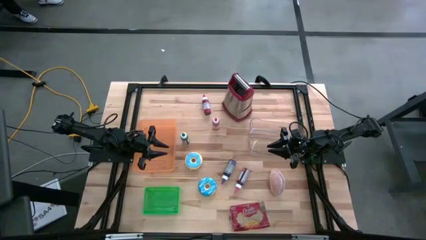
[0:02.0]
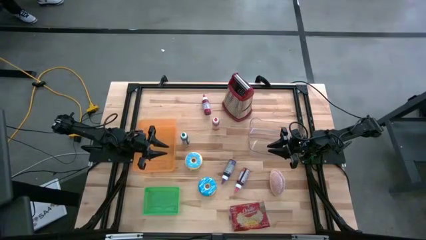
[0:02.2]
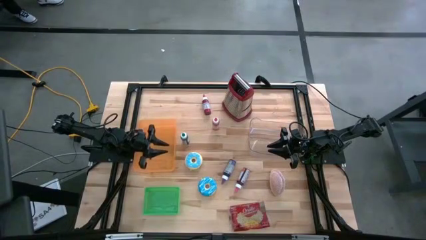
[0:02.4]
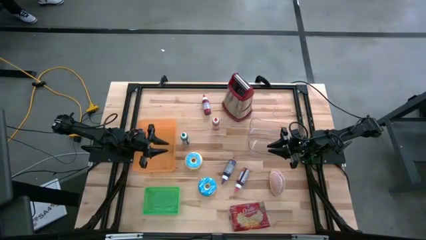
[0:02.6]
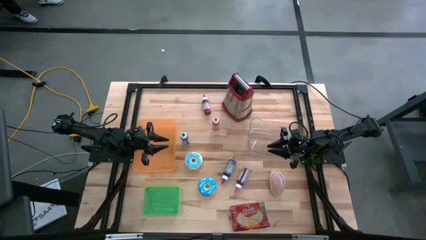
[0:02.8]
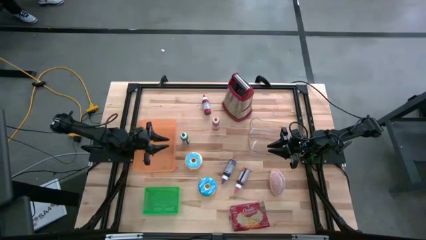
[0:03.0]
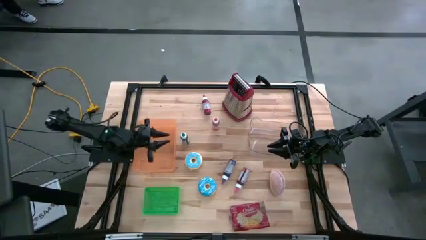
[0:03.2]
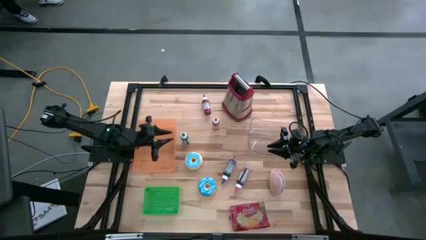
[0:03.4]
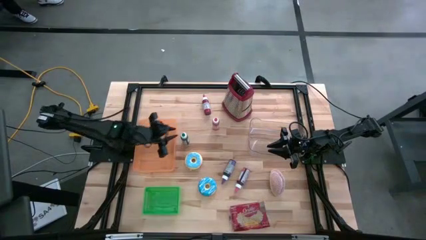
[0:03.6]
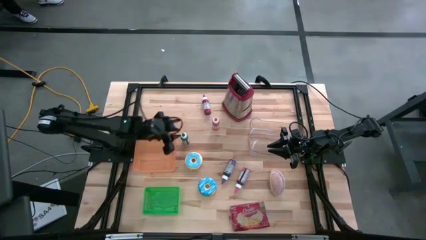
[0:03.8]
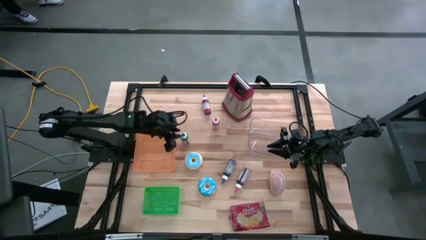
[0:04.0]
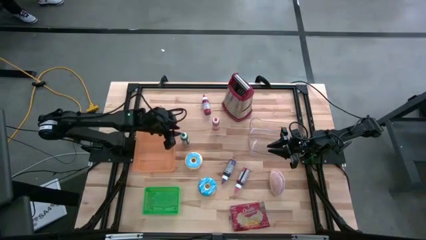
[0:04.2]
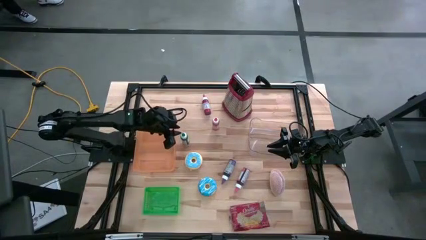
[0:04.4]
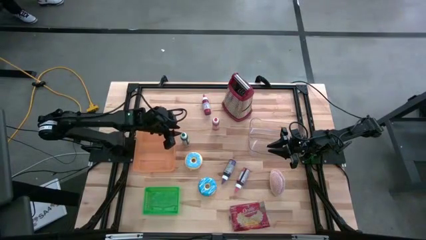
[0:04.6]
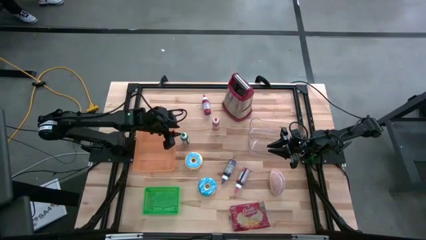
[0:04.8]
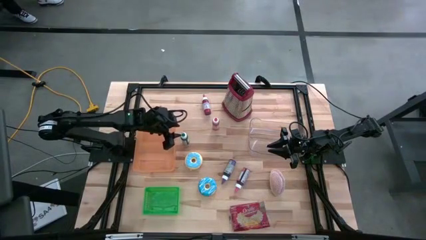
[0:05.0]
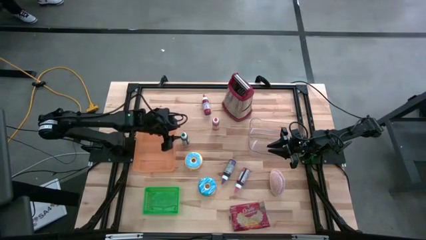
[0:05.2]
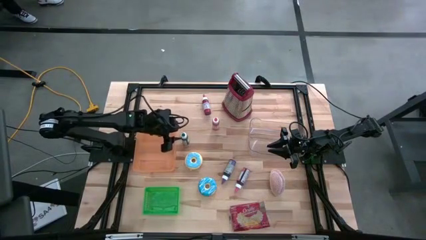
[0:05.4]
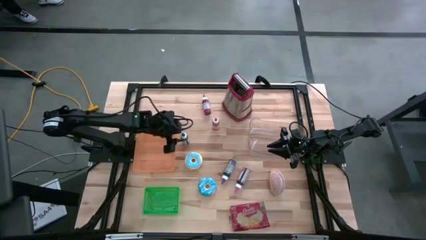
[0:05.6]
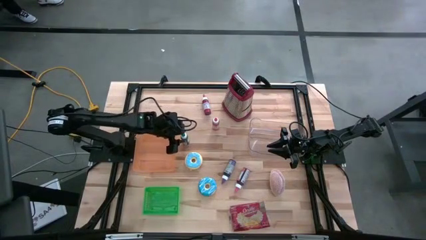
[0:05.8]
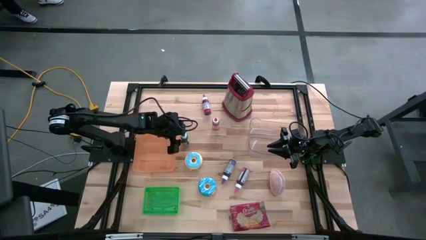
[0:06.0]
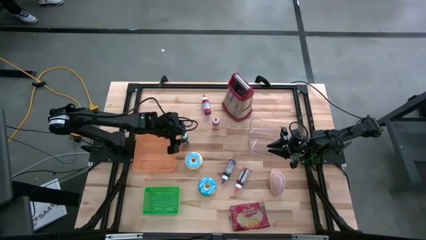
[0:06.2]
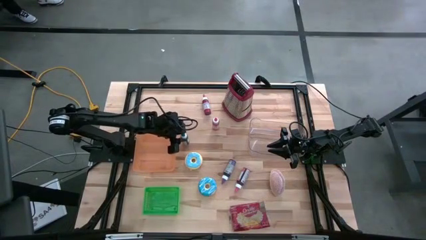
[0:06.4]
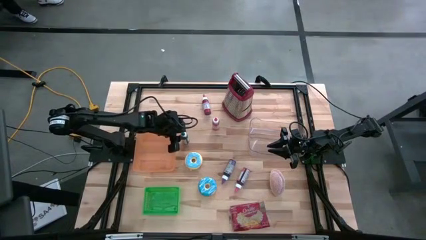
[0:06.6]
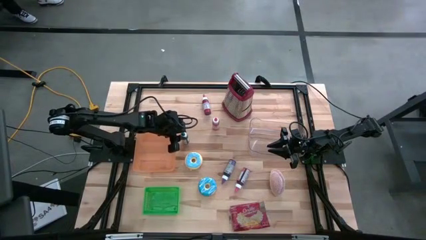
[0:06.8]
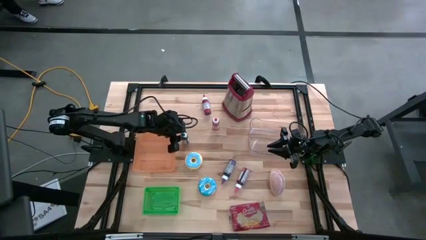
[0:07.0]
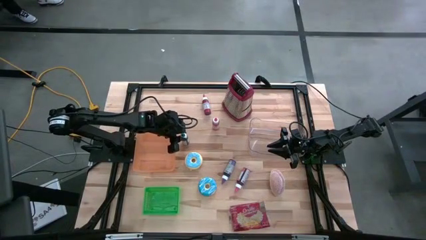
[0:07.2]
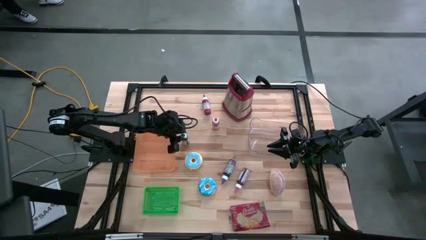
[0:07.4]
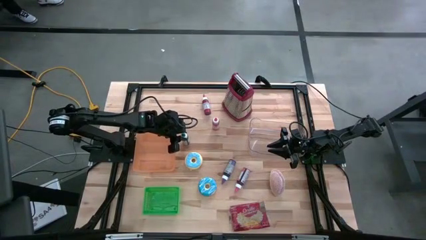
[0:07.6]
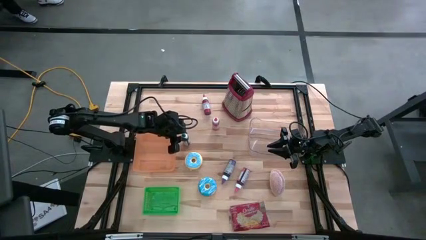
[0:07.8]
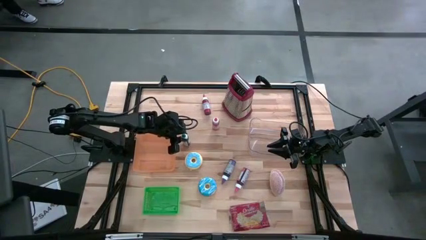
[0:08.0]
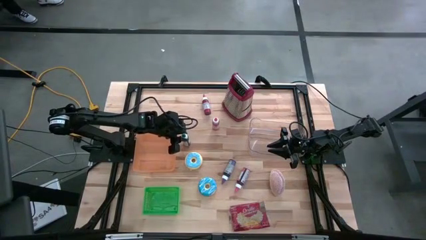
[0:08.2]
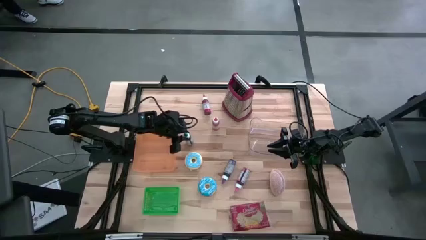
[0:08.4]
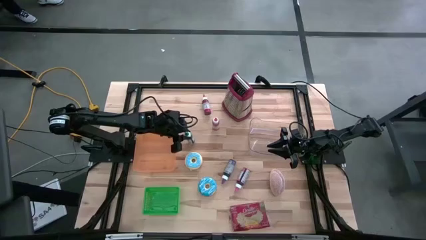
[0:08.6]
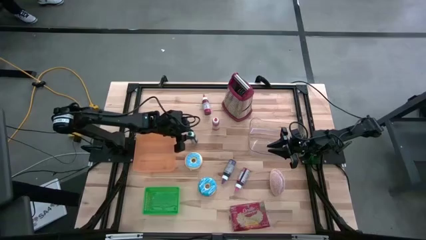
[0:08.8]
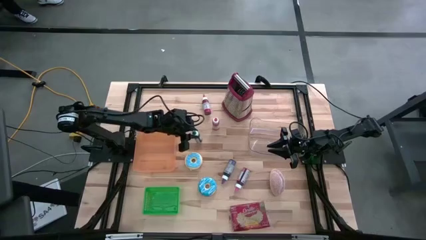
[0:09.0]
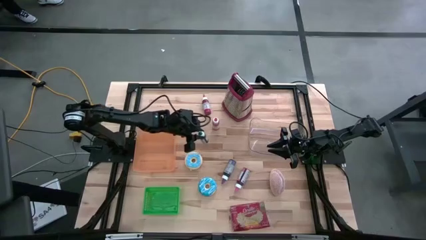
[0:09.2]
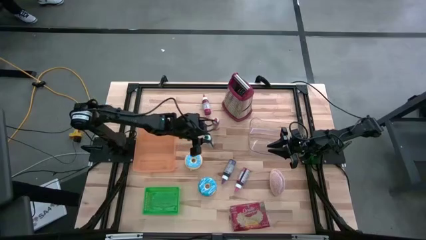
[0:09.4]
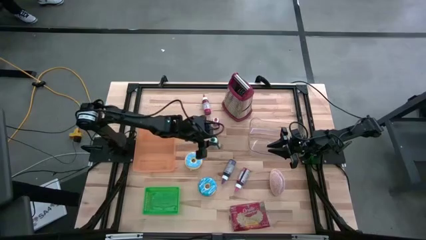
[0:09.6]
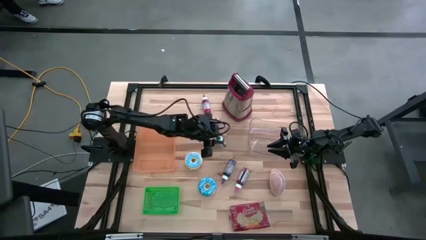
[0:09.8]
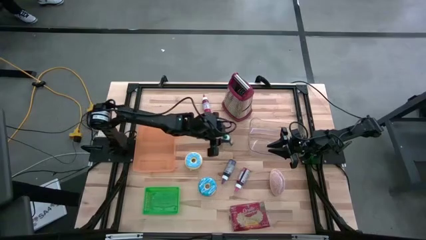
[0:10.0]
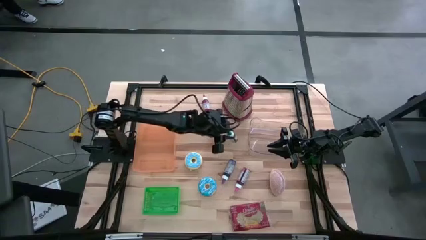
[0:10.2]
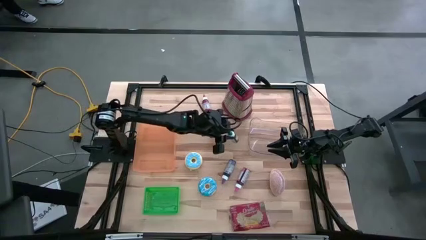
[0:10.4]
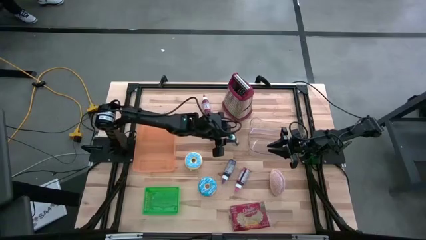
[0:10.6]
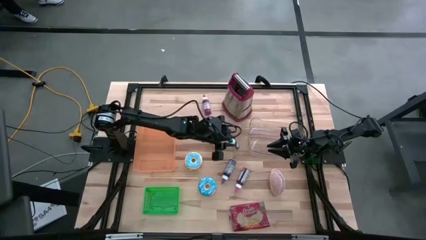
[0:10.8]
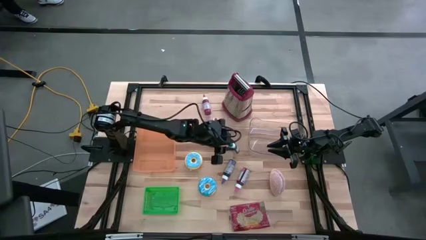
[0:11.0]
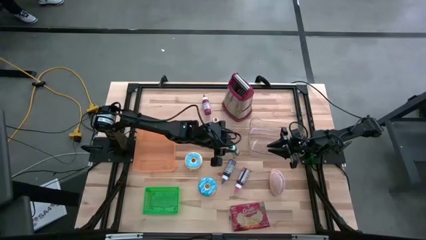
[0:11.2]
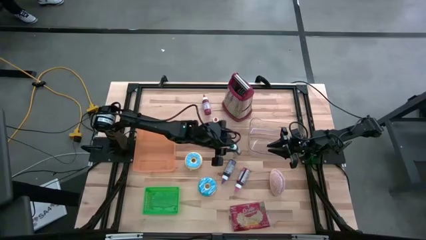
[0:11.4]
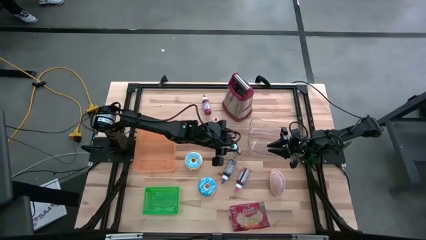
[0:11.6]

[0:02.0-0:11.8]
Put the green food coloring into the transparent bin
